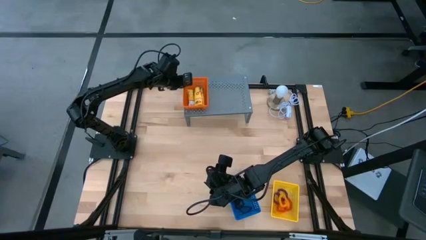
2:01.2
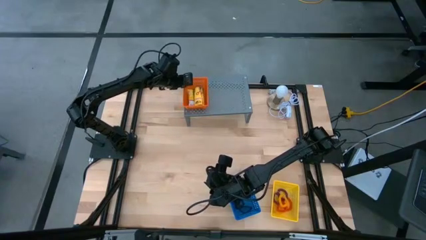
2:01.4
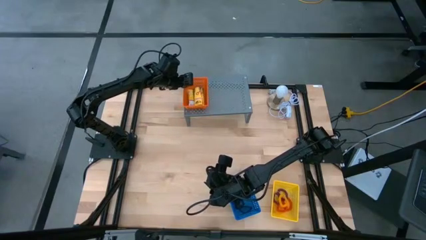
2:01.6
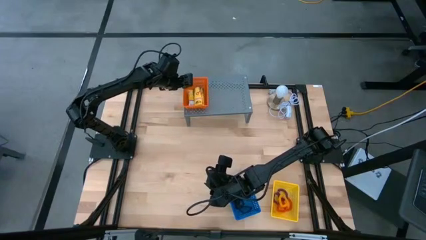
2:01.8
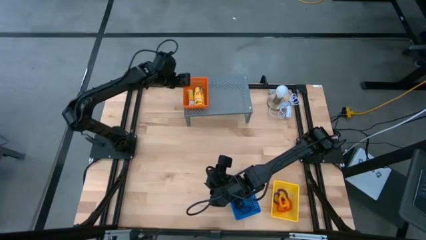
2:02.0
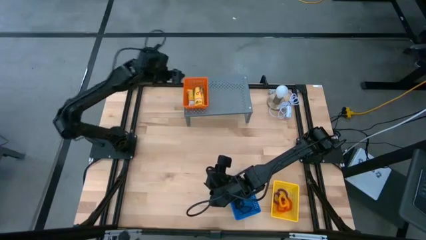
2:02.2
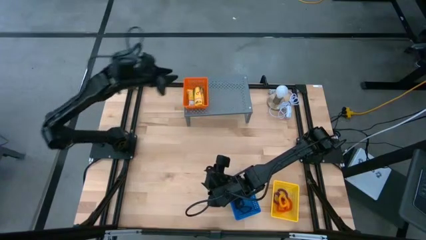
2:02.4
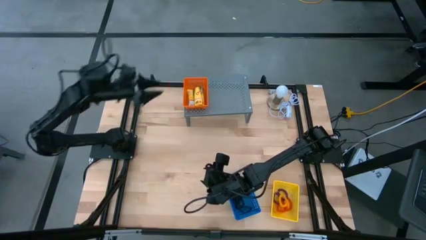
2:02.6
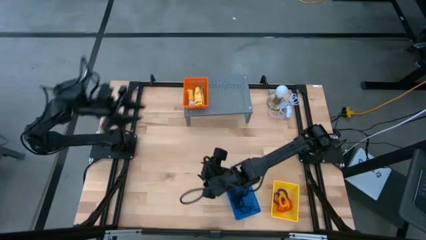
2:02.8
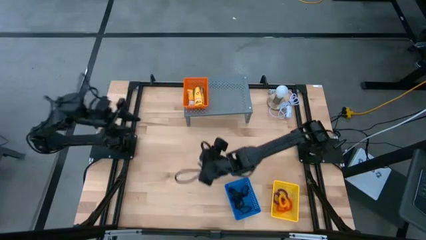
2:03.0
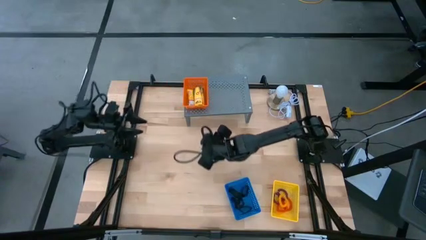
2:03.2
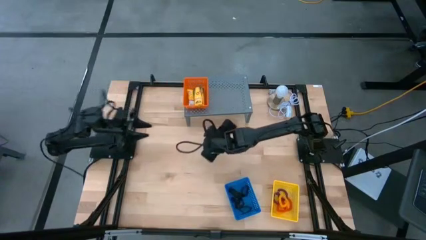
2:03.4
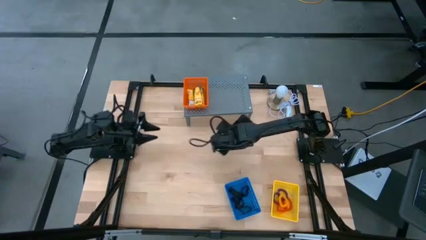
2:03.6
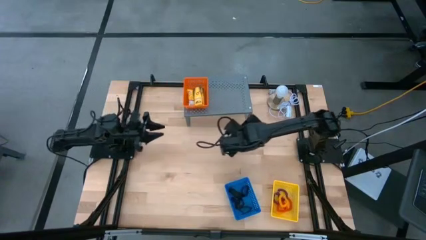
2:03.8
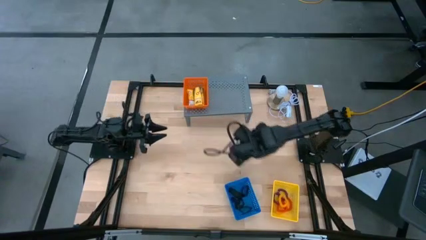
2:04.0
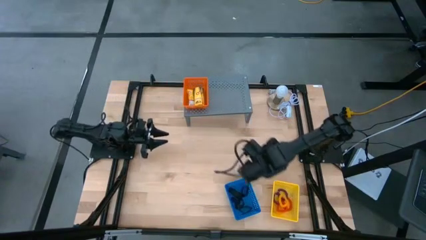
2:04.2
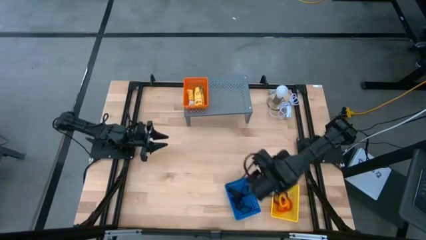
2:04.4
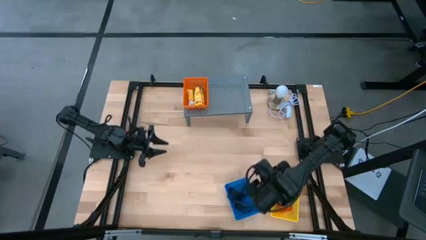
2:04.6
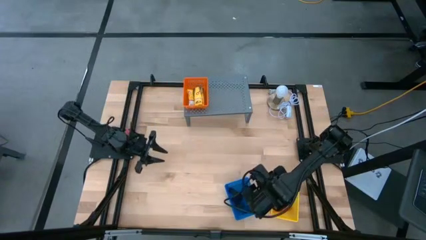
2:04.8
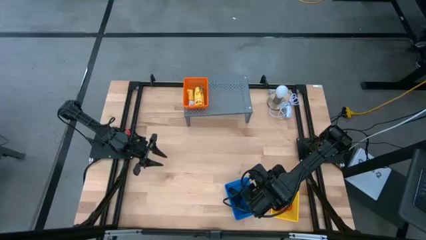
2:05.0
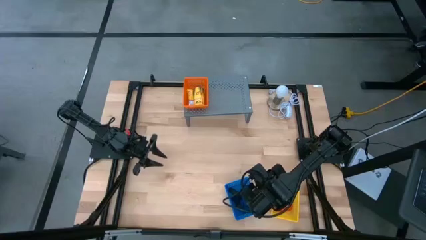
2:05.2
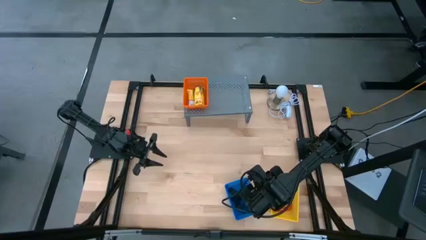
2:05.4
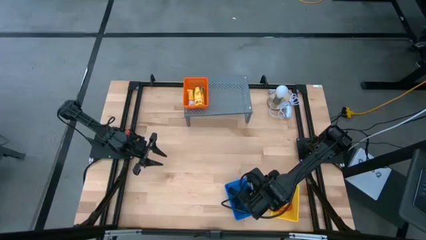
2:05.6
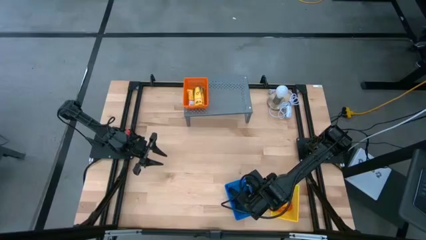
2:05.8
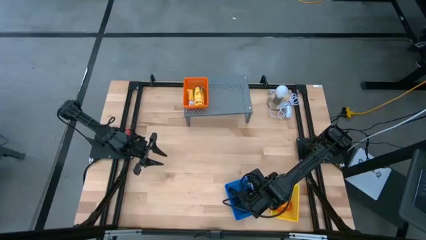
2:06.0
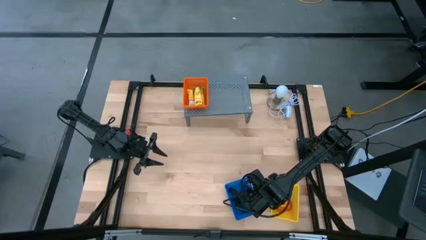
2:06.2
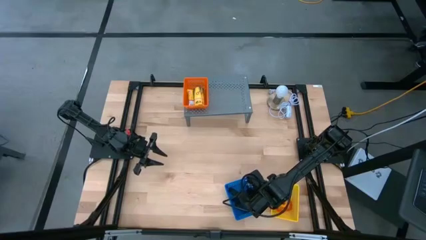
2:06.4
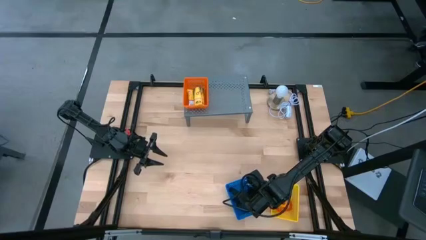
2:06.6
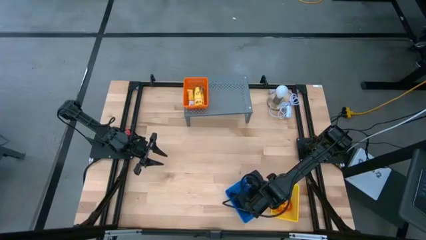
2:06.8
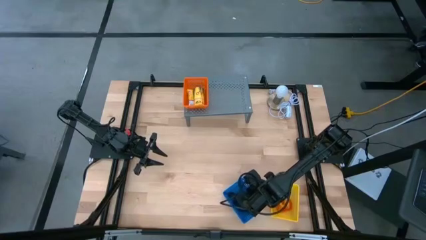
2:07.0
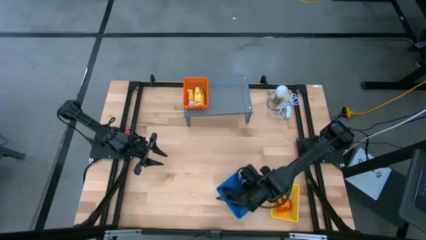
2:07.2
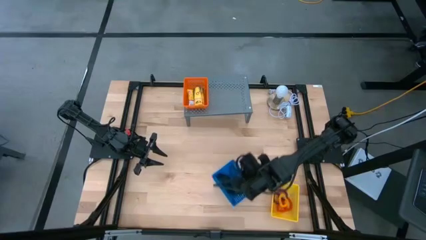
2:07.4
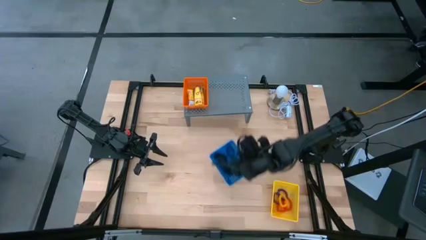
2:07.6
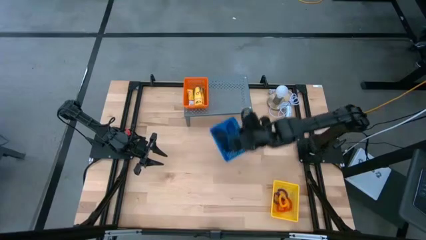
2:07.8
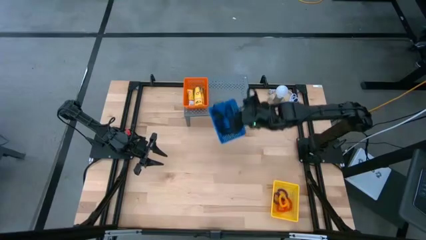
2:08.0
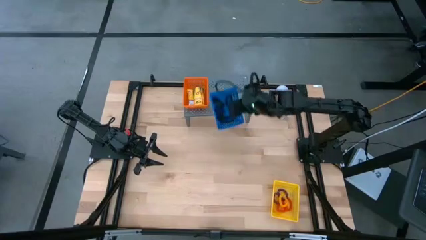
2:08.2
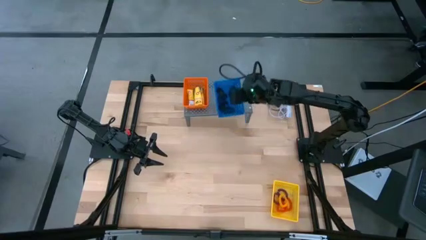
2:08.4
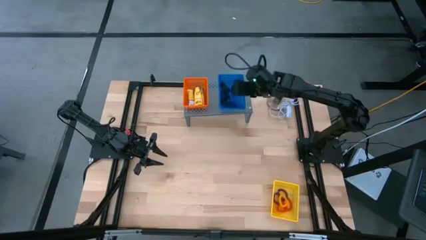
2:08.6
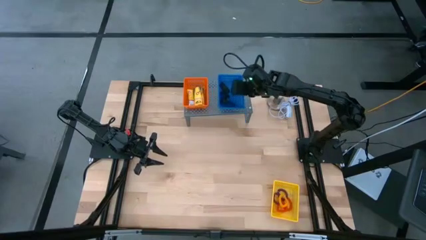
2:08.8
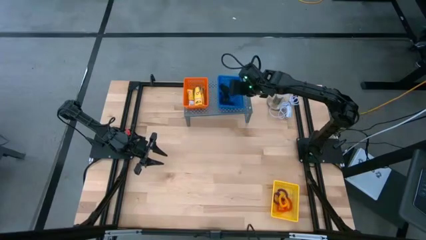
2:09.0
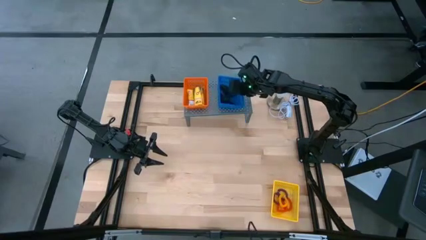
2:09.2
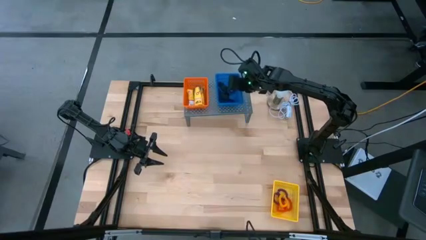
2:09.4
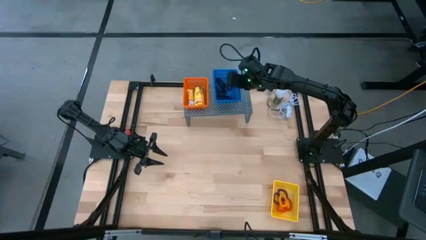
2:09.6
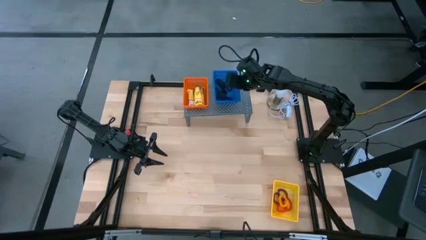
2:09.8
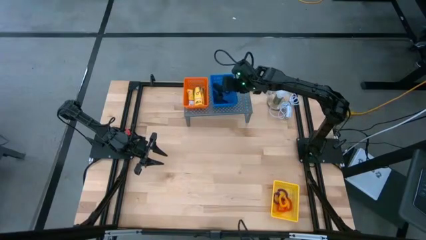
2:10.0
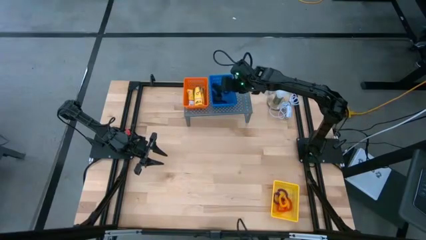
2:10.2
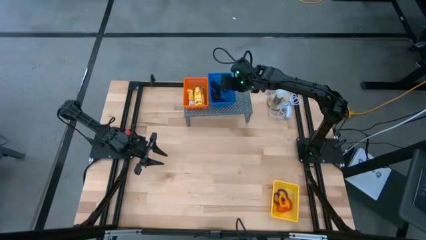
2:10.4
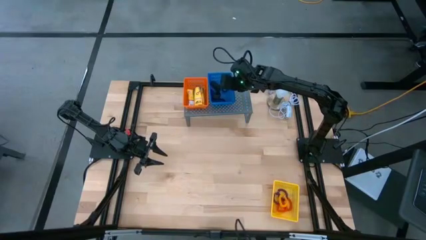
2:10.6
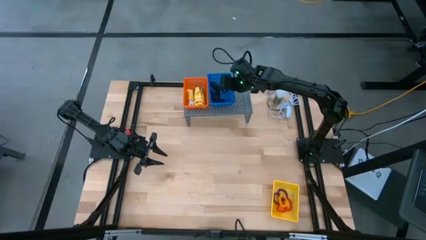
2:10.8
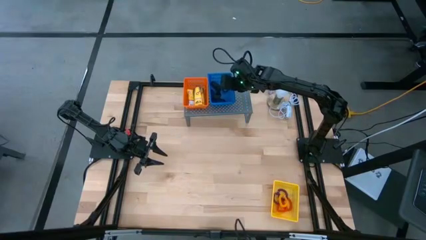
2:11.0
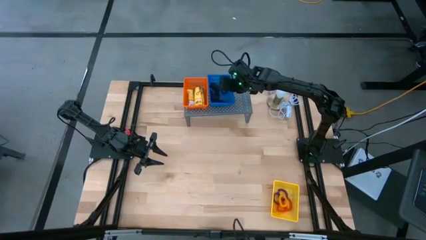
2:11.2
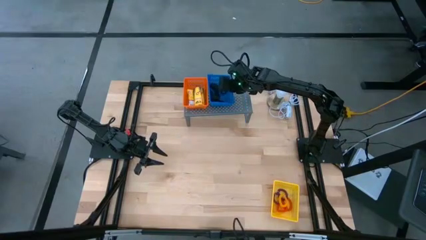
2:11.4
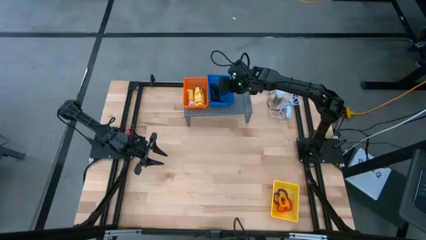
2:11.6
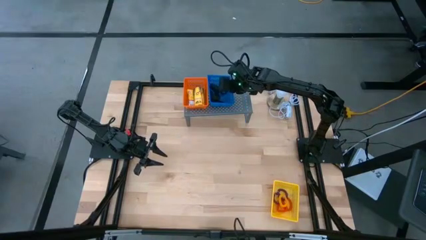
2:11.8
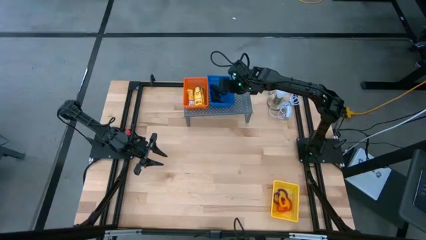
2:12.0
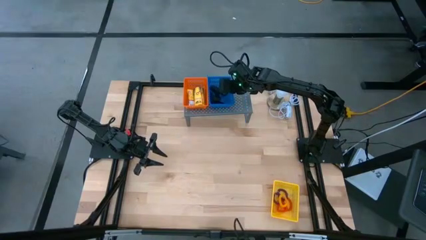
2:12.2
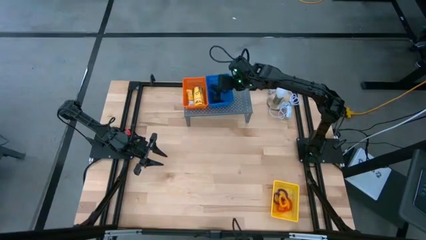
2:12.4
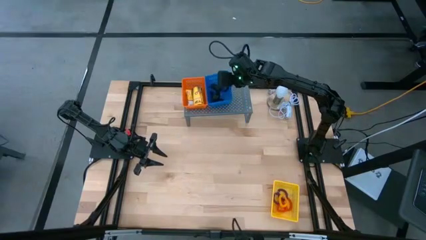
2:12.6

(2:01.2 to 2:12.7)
Task: Pick & Place Office Desk Supplies
Put the blue bin onto the shelf

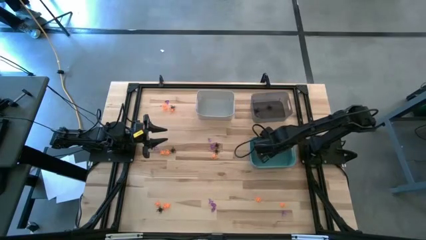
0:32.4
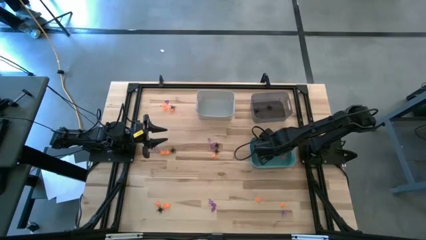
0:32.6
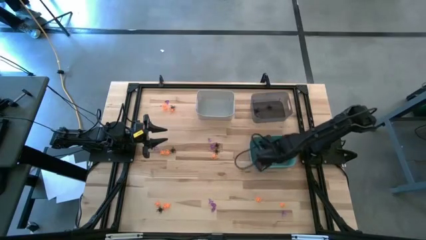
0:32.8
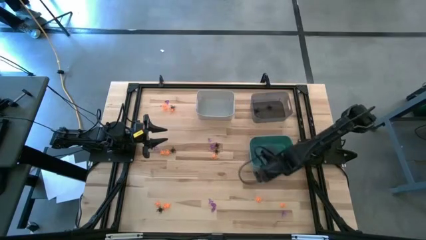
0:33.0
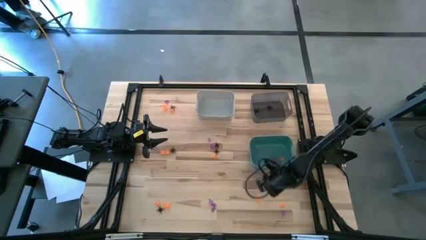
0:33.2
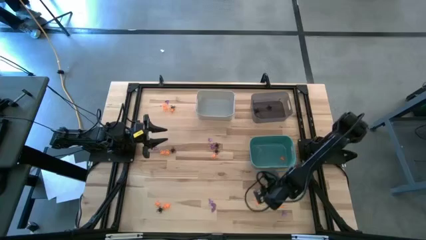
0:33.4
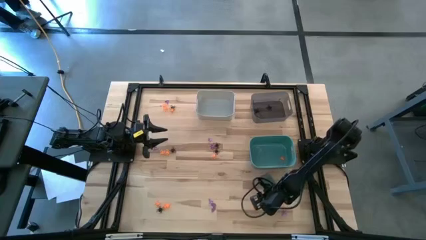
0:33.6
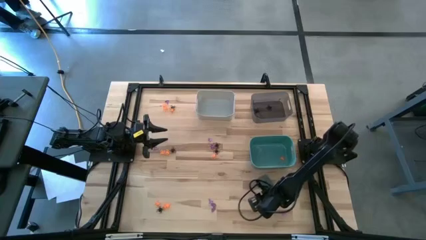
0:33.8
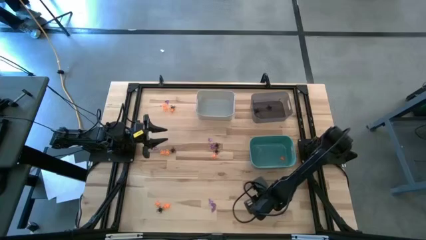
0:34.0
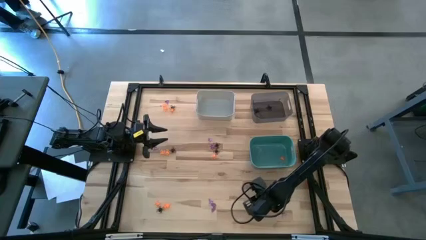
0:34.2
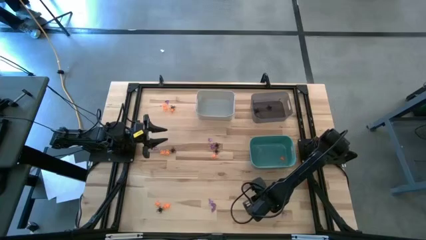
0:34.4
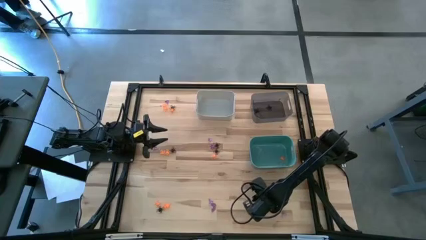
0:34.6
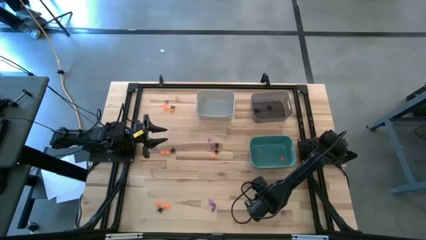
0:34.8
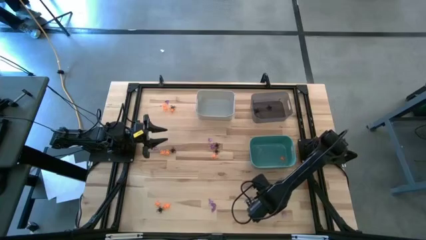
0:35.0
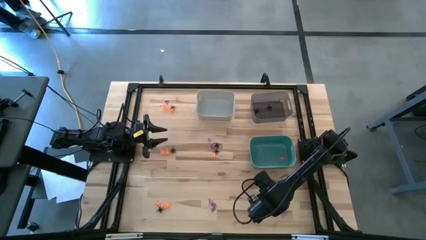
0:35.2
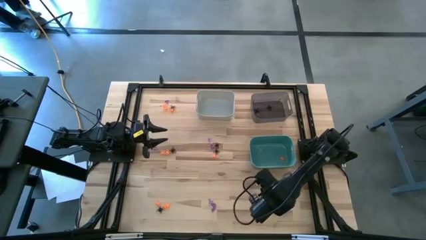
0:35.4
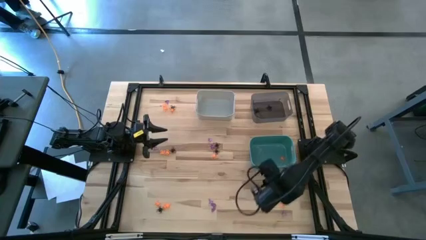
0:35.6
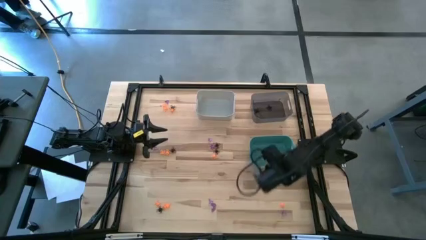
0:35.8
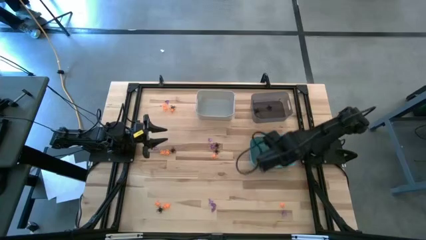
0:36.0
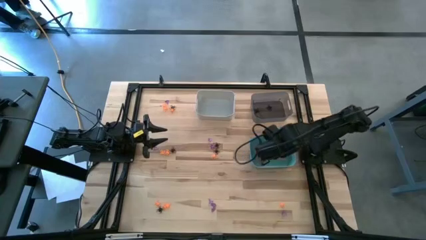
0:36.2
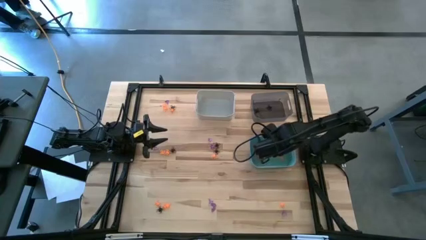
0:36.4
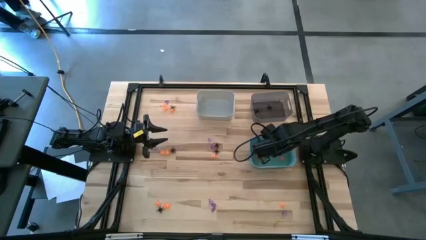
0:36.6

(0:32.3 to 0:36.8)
Task: Sort Halloween decoration
Put the orange spider toy into the green bin
